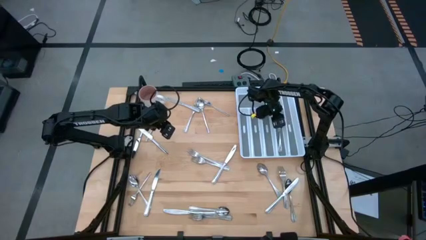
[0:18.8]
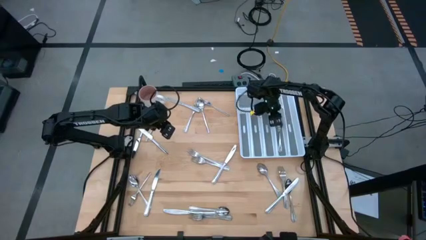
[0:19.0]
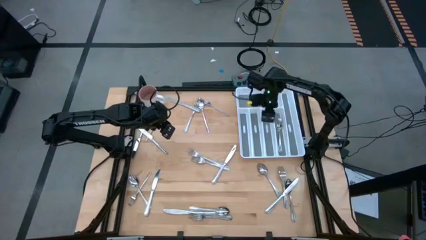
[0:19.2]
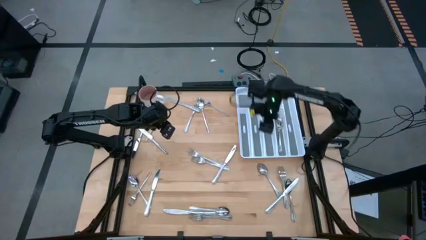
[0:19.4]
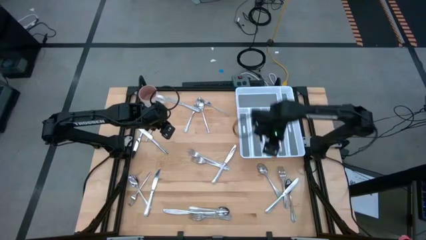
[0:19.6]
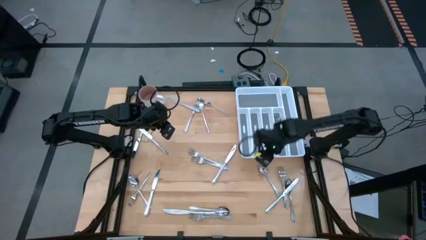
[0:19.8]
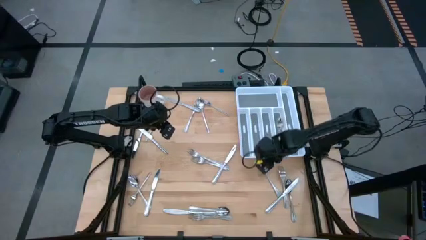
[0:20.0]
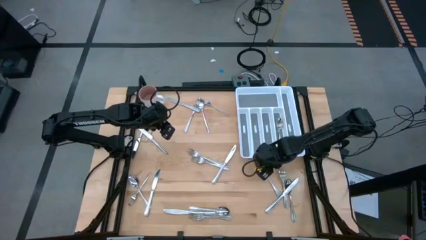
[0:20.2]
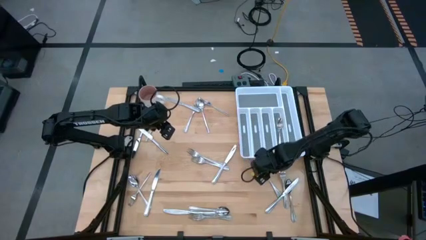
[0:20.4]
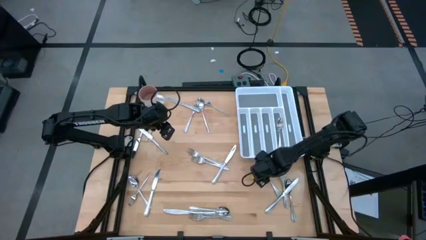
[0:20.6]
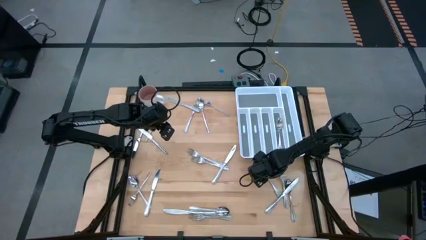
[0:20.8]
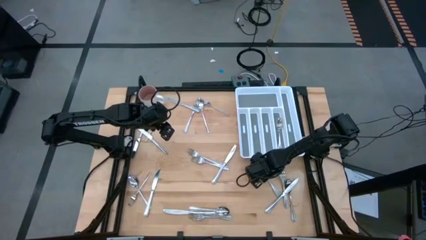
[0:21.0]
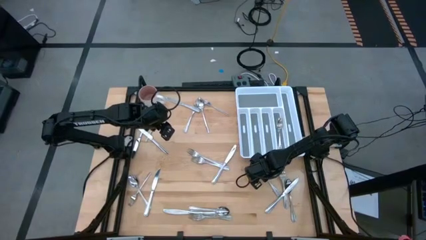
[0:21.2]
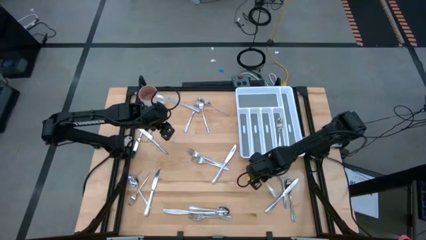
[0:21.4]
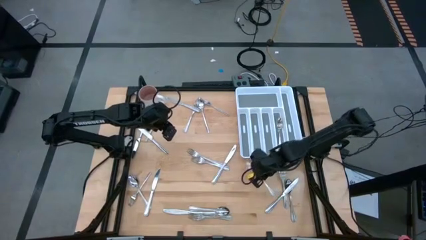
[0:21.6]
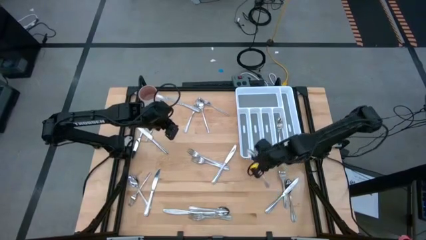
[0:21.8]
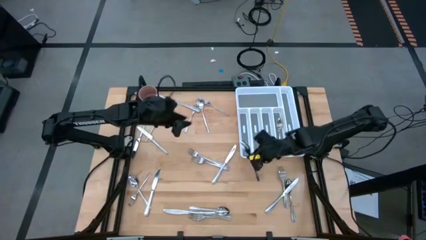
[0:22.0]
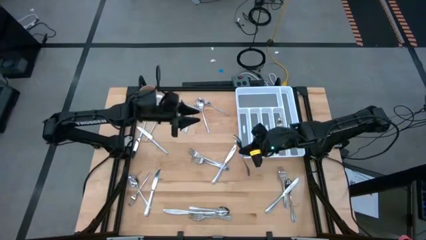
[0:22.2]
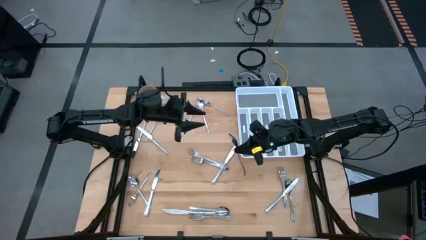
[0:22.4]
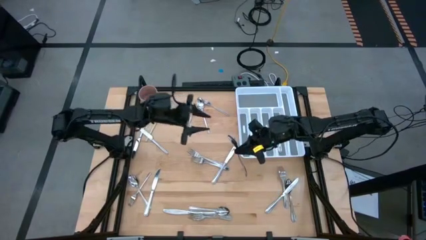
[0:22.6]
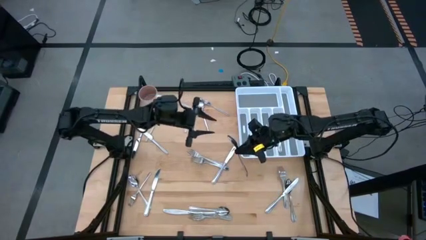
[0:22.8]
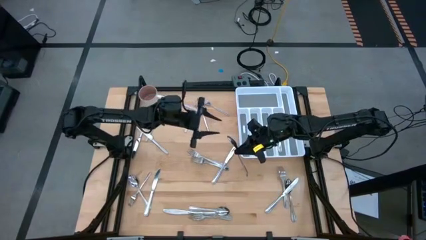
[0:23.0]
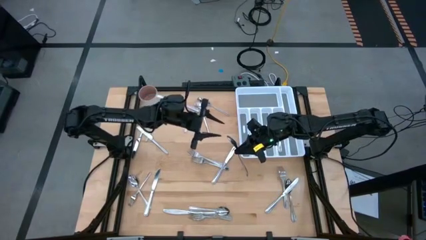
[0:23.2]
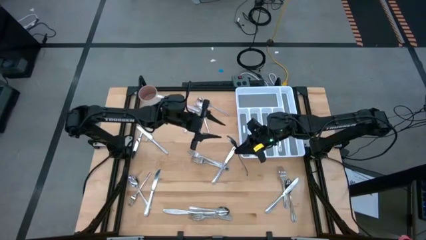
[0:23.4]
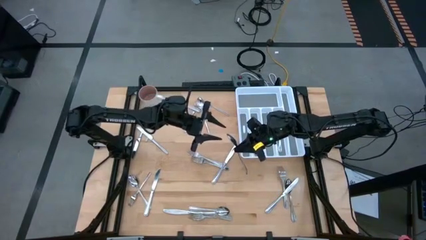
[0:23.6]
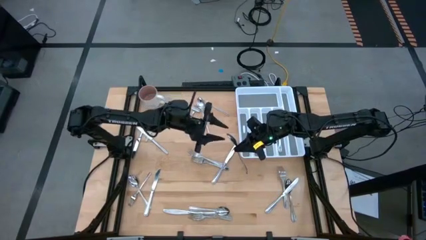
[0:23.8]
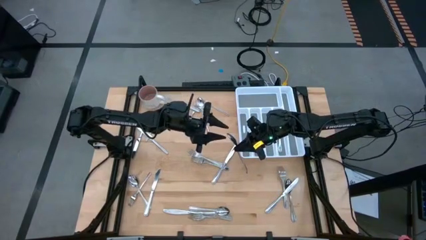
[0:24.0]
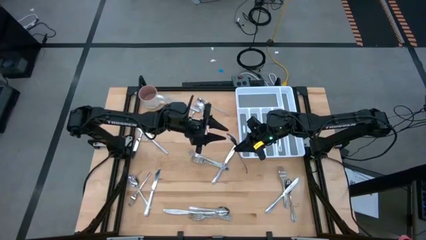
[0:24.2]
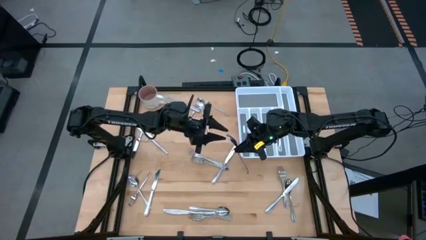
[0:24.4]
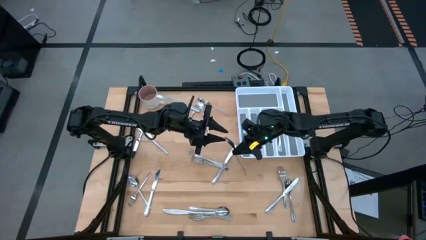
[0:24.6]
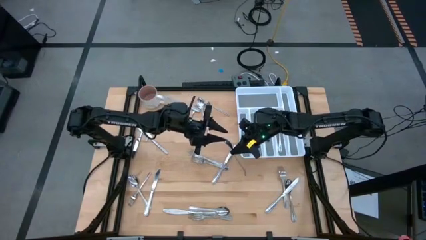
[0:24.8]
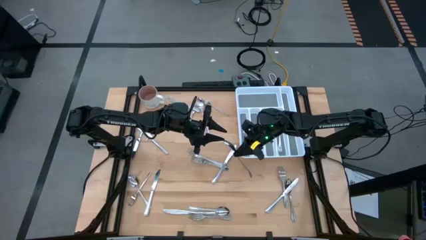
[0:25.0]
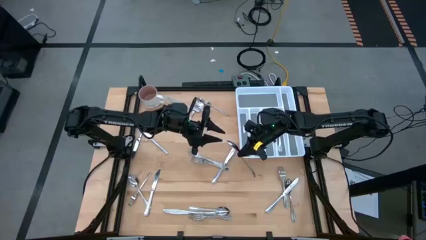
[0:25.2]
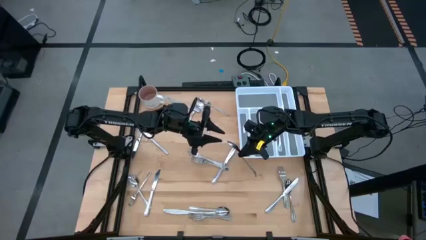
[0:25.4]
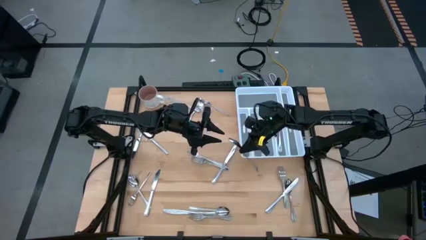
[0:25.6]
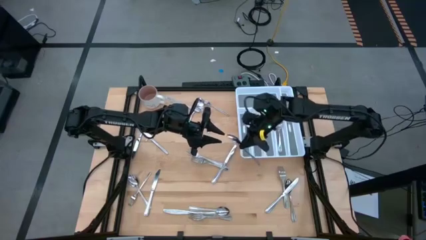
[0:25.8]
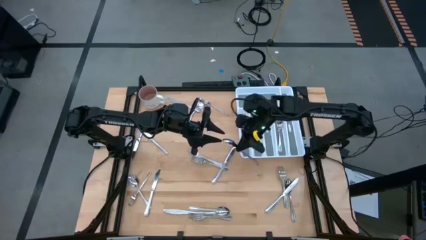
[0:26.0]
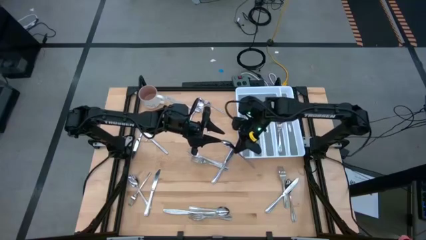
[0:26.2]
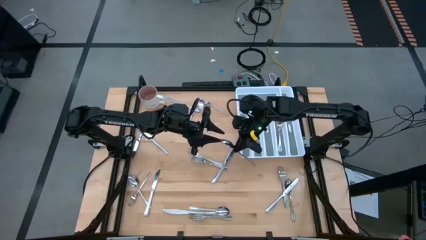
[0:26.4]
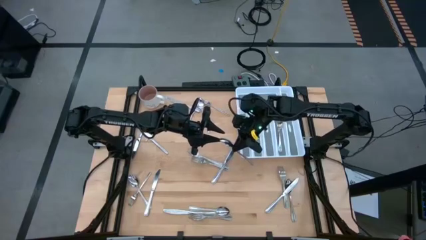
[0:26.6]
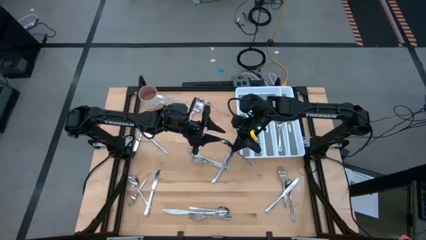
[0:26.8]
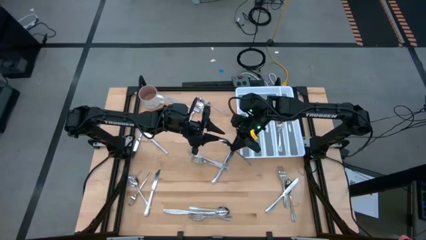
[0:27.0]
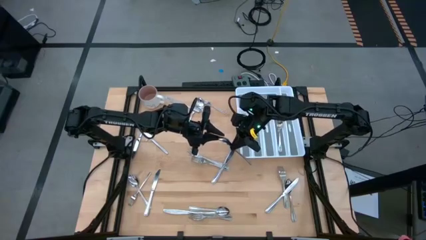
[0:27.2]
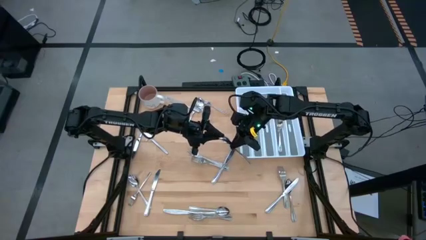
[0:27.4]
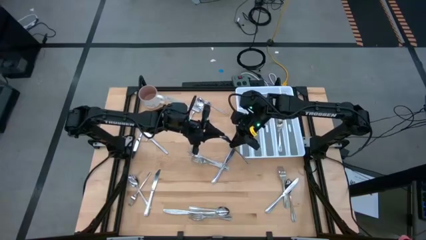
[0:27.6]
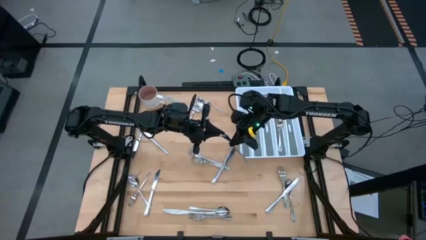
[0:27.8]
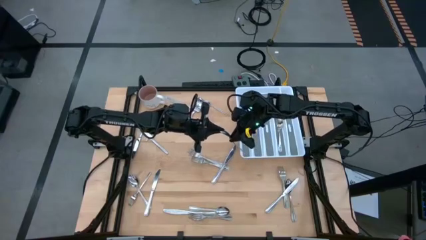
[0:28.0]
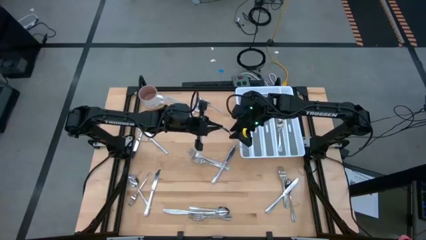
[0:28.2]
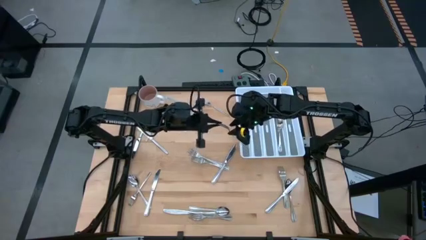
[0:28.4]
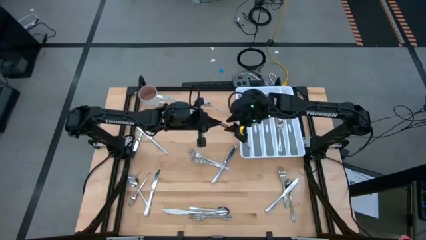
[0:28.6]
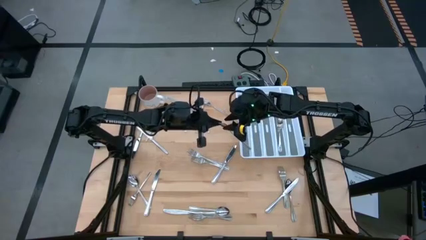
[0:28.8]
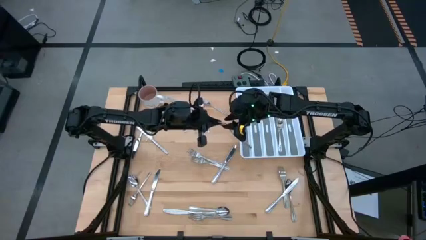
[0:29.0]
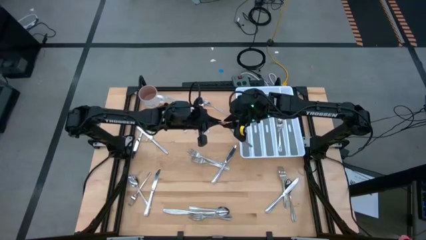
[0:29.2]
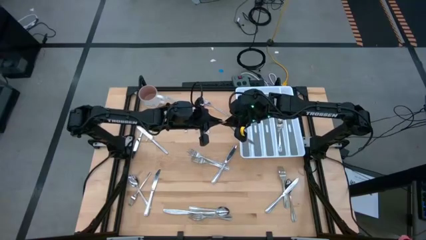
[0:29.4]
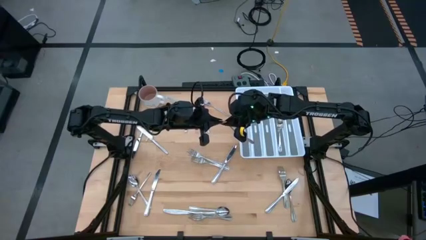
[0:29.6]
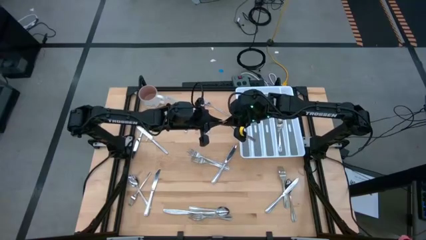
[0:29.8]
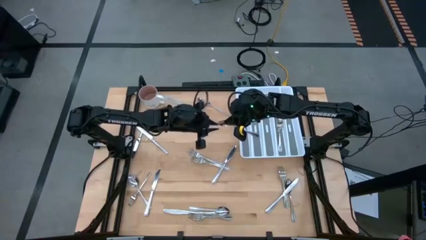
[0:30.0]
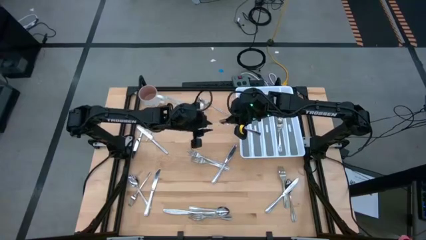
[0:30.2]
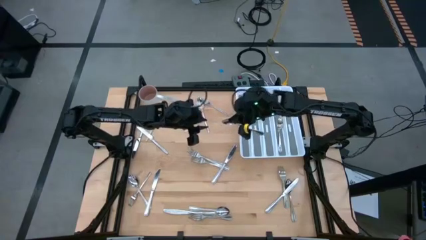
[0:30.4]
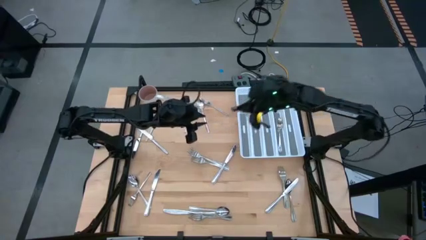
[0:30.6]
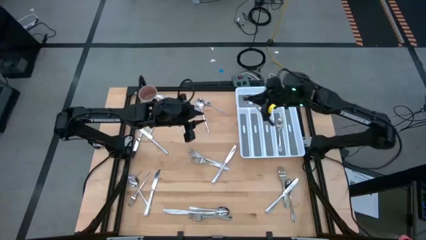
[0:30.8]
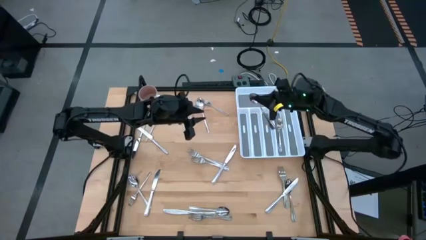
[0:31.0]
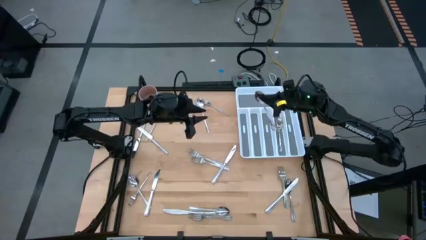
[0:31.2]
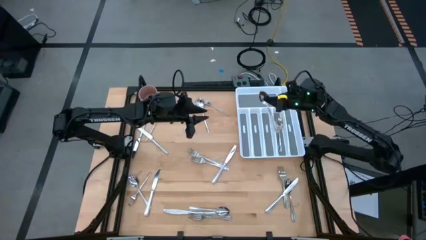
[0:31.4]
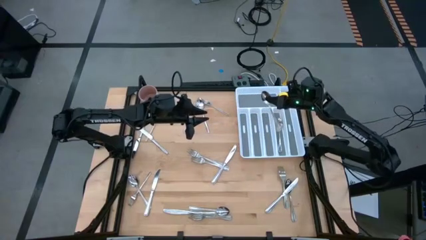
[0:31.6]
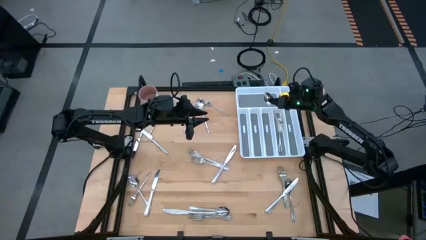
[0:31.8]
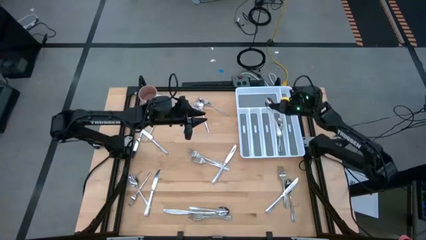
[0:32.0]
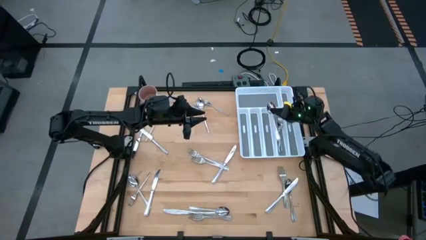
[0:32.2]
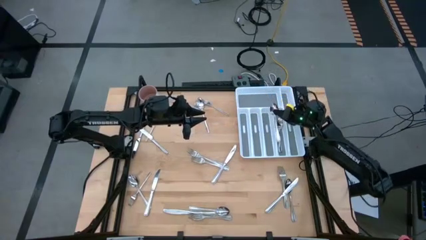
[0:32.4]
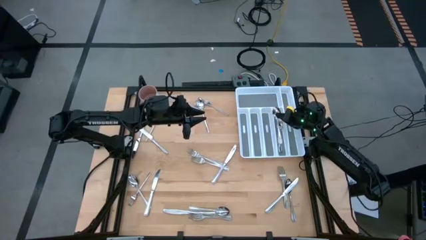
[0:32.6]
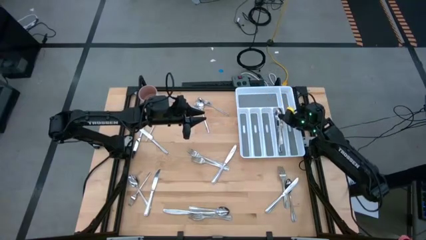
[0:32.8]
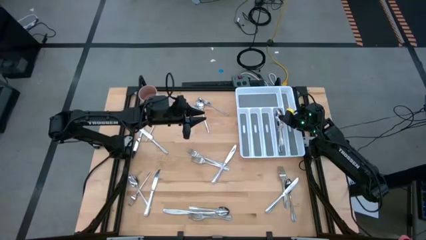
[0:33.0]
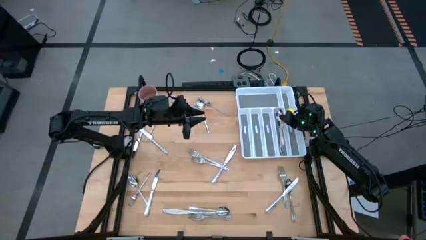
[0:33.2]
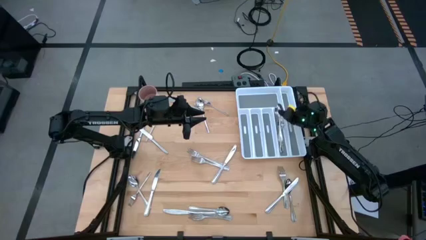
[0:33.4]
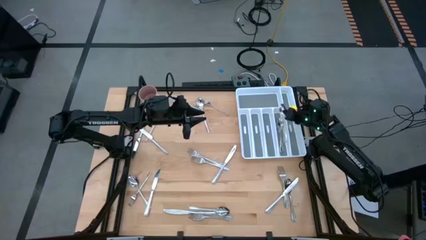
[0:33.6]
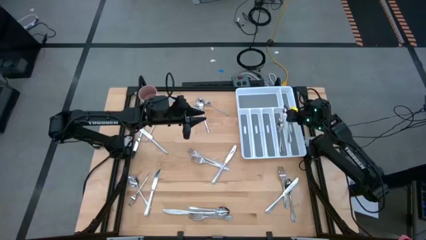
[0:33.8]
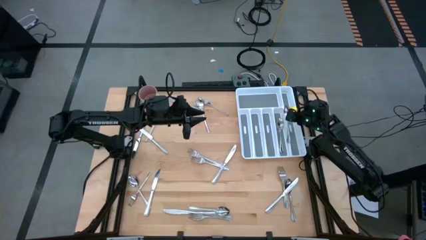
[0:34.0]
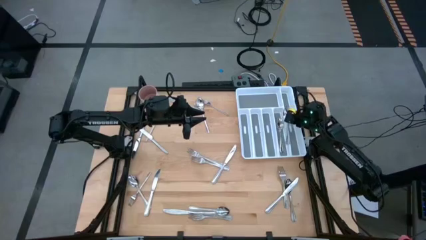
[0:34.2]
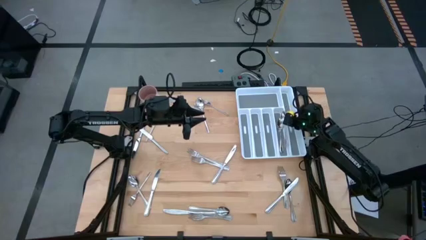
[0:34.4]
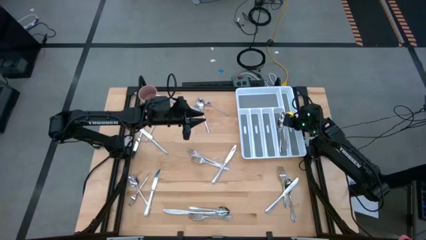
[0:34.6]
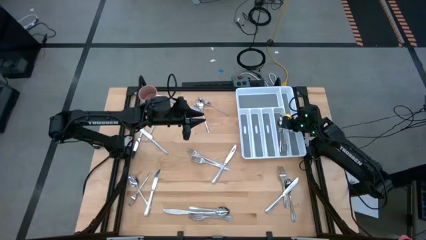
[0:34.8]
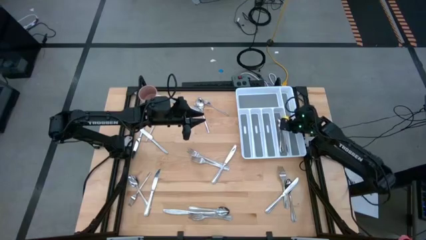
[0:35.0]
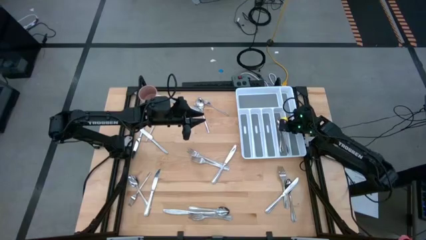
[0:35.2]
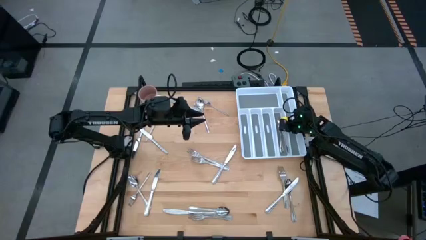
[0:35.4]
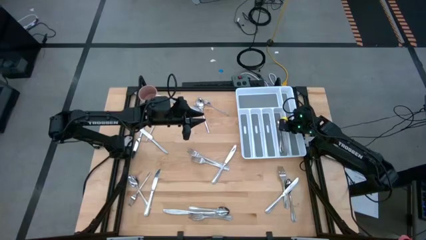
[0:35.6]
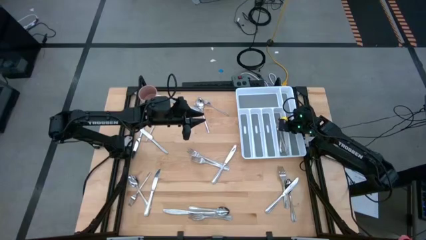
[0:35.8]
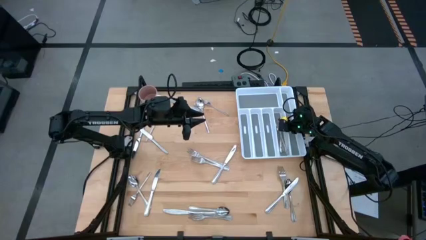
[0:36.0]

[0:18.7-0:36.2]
Task: Sort silverware
Put the silver spoon into the silverware tray
